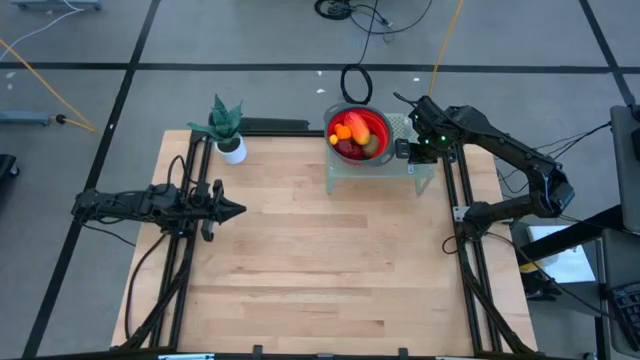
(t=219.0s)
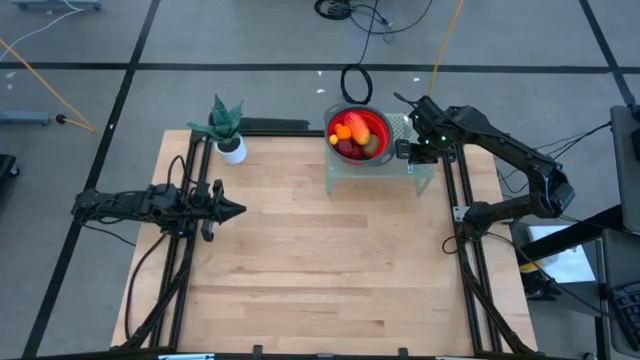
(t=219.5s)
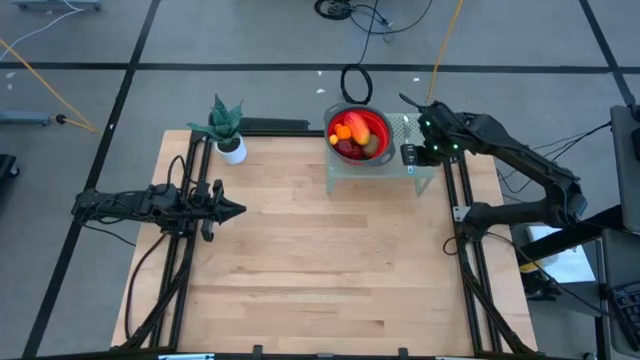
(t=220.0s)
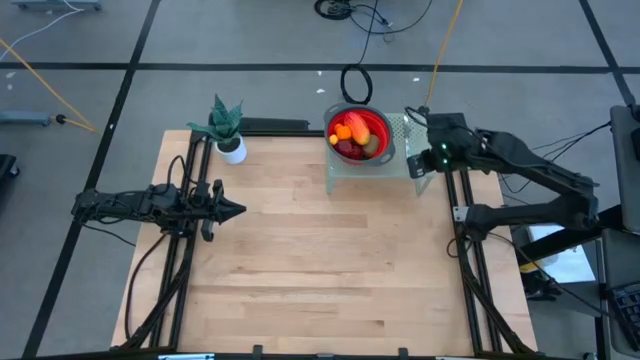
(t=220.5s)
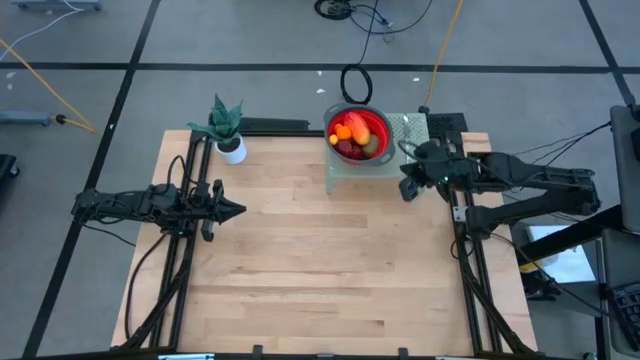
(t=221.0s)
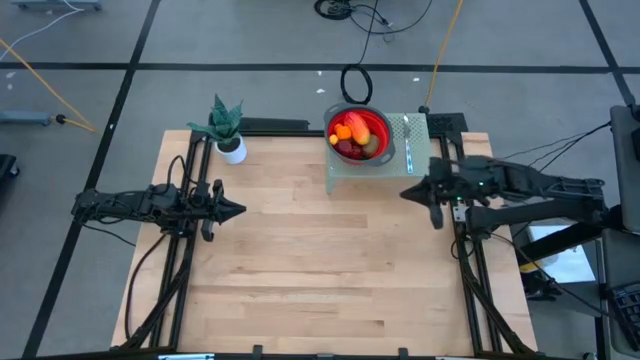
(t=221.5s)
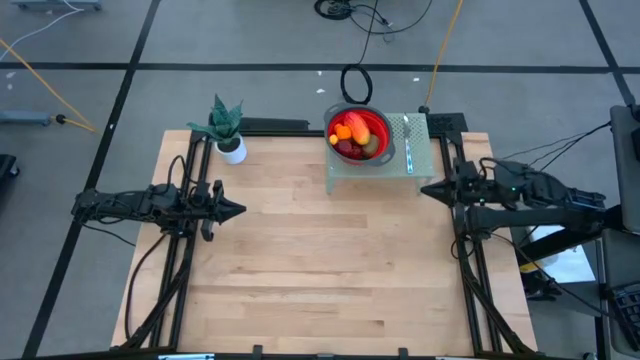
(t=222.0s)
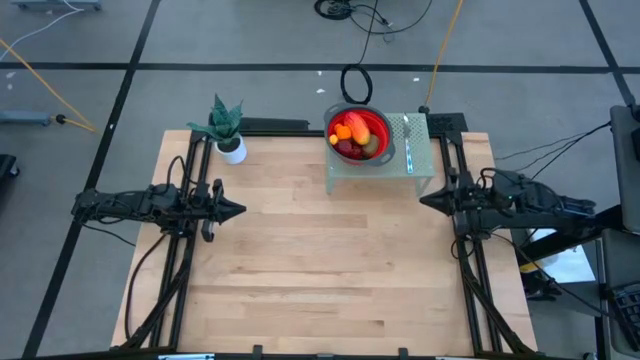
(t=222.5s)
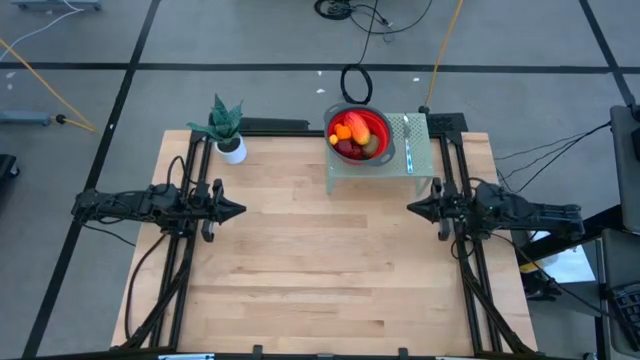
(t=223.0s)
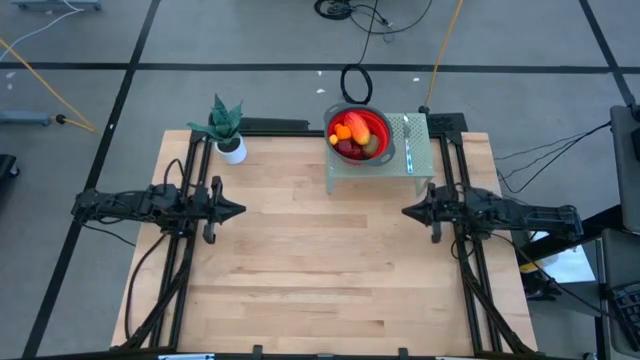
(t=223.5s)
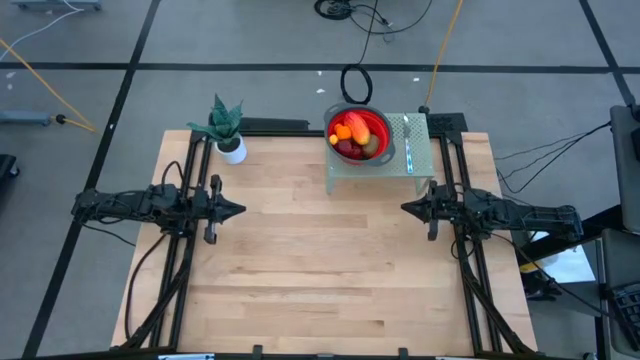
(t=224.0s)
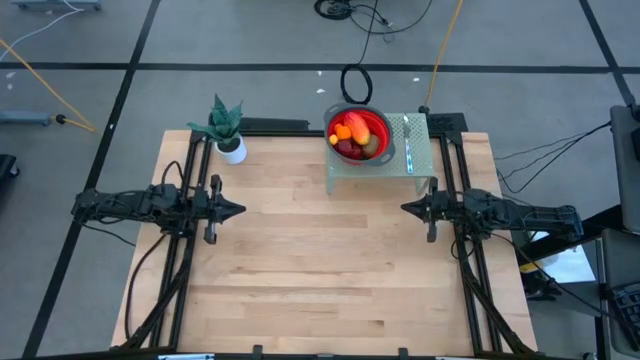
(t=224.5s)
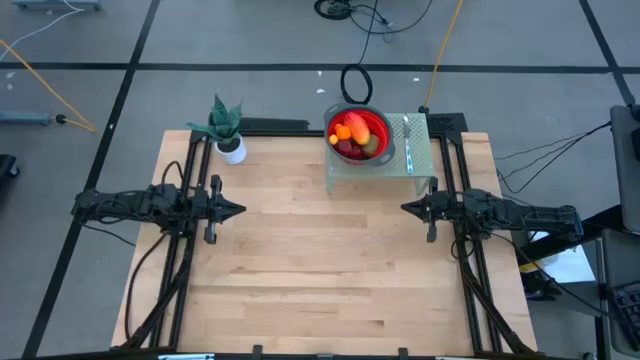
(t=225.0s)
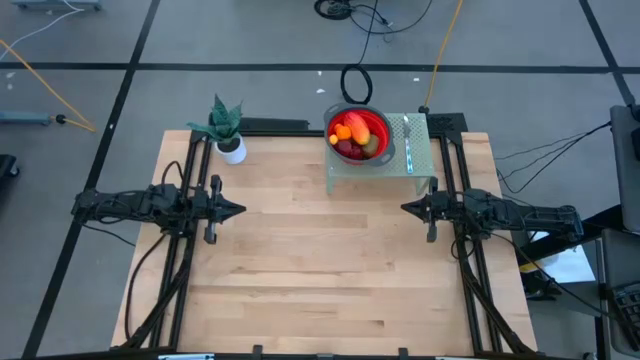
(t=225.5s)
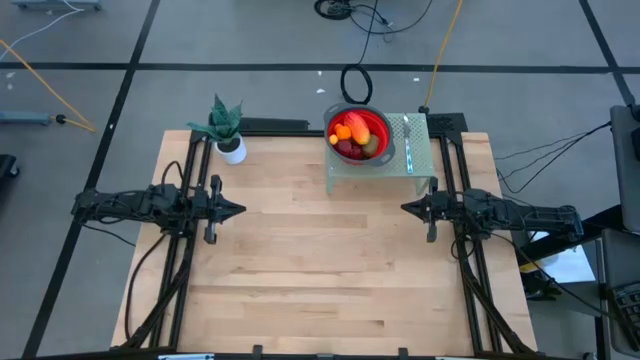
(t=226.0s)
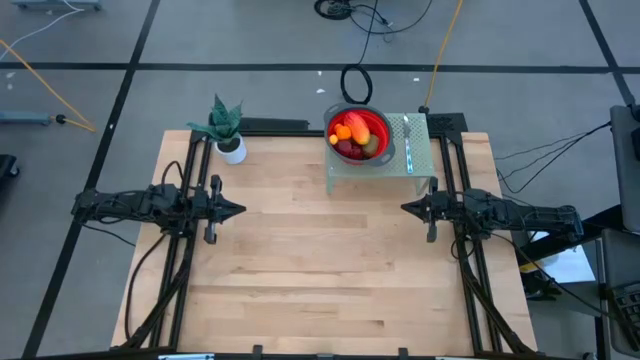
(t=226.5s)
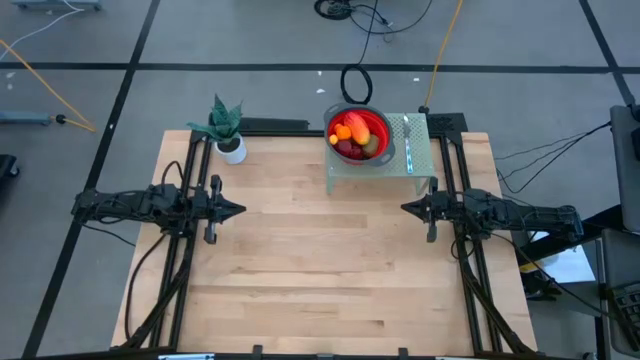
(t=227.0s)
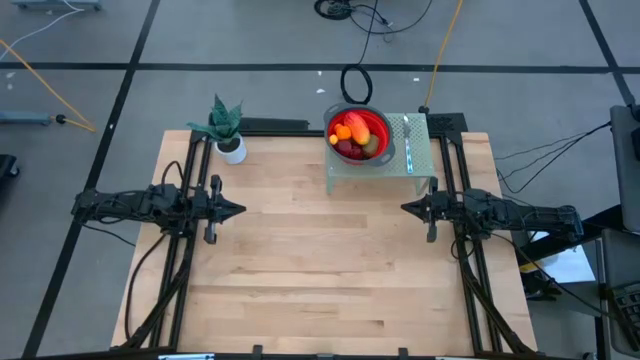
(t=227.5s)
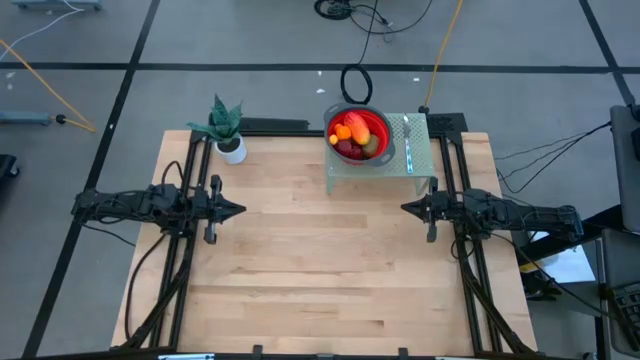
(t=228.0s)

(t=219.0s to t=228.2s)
Task: Pick & Place Fruit
Return To Home Position

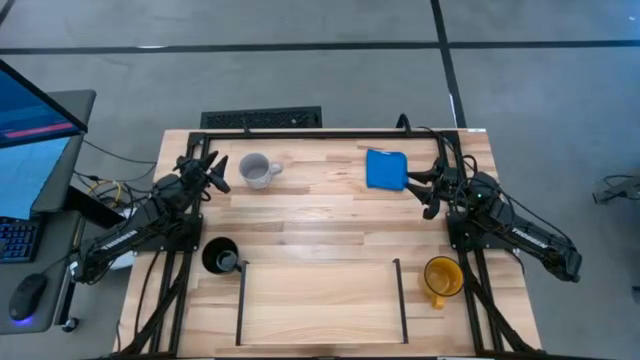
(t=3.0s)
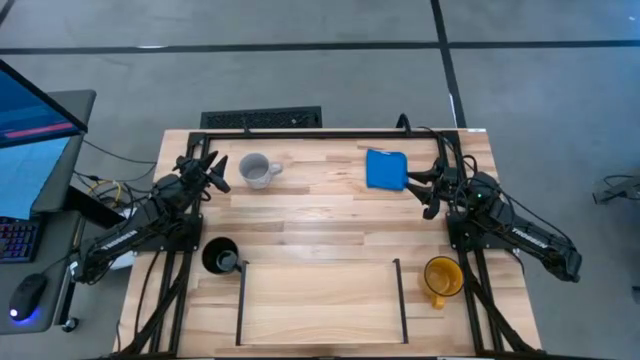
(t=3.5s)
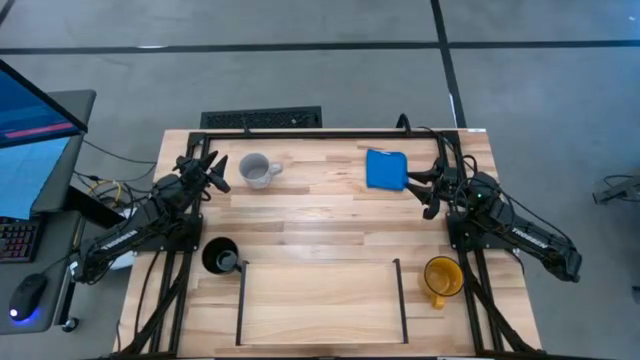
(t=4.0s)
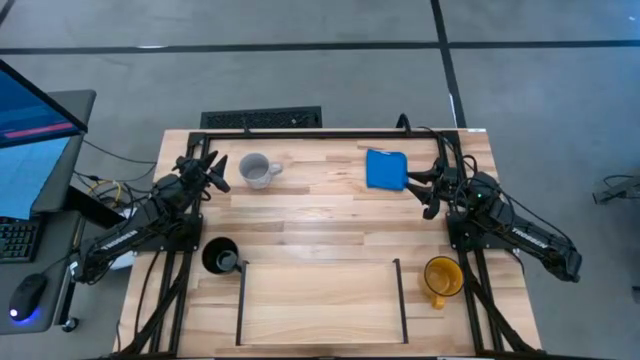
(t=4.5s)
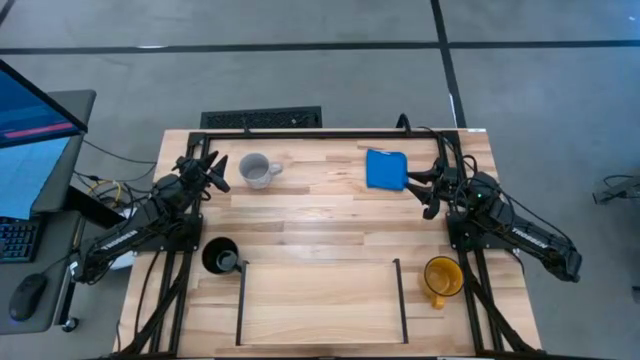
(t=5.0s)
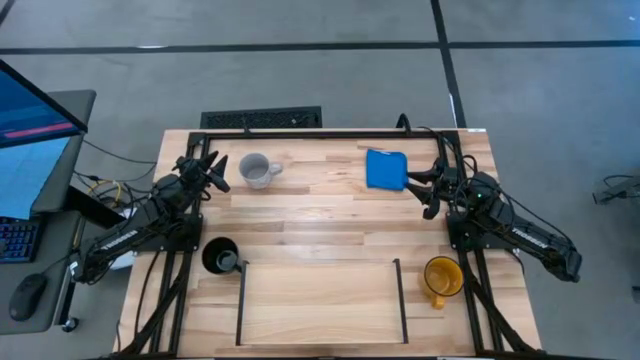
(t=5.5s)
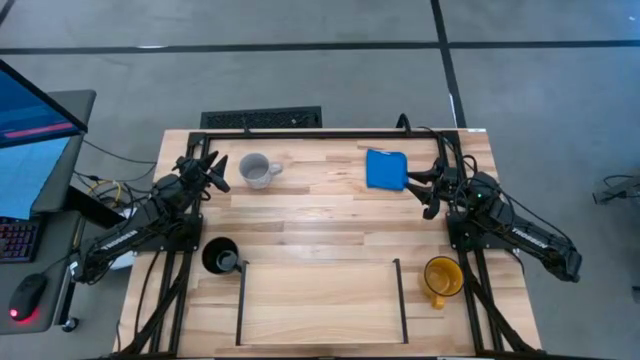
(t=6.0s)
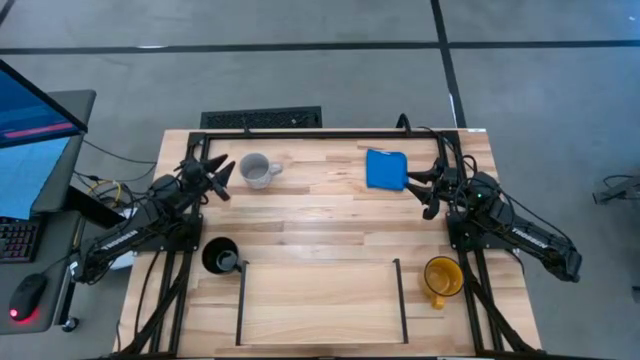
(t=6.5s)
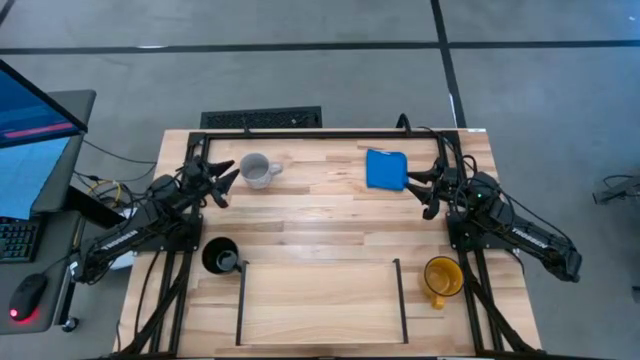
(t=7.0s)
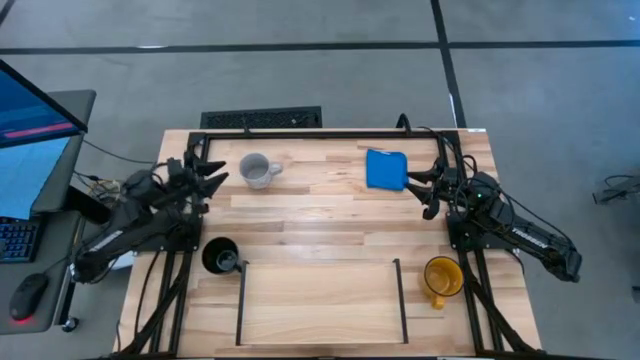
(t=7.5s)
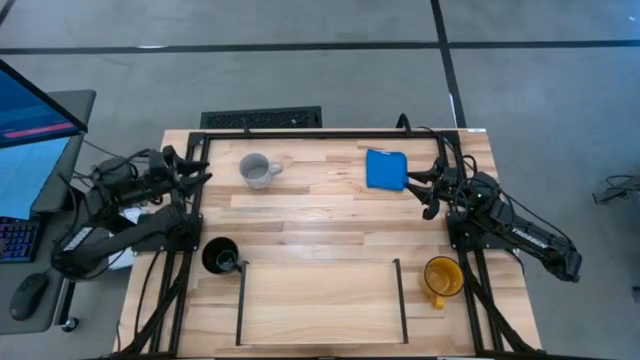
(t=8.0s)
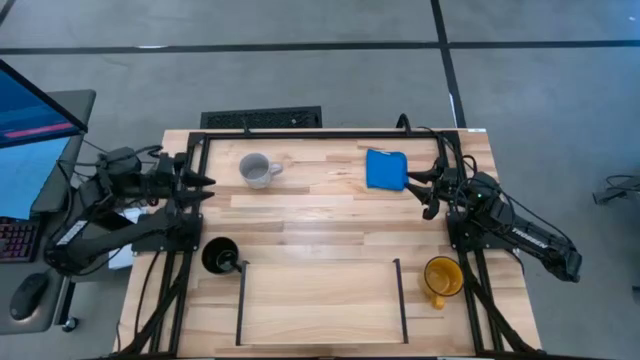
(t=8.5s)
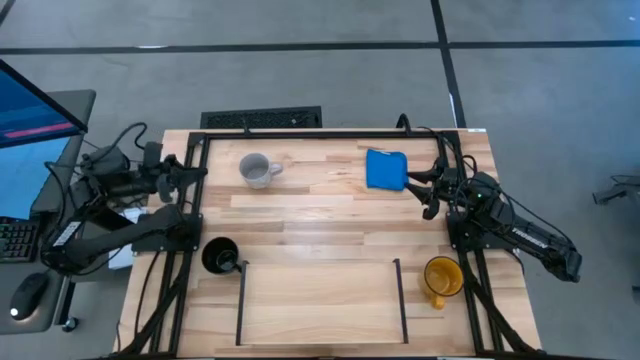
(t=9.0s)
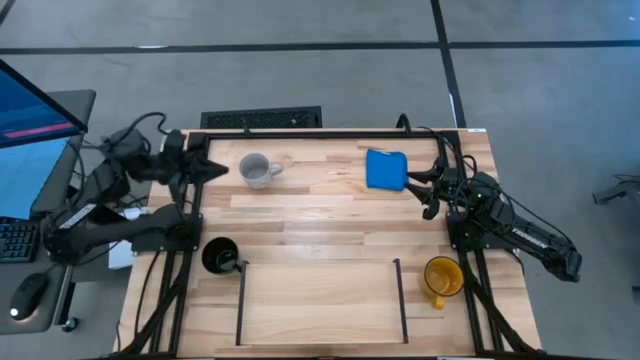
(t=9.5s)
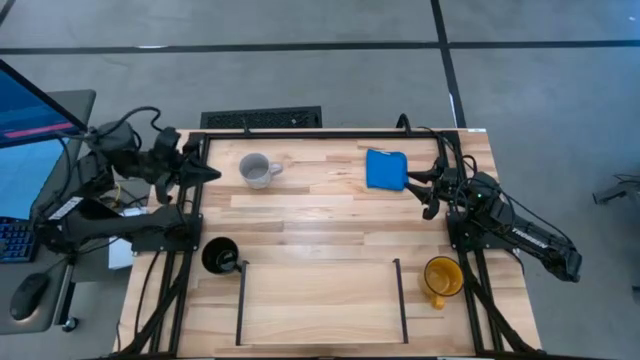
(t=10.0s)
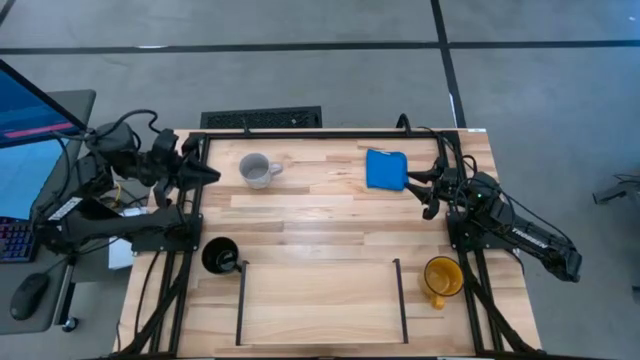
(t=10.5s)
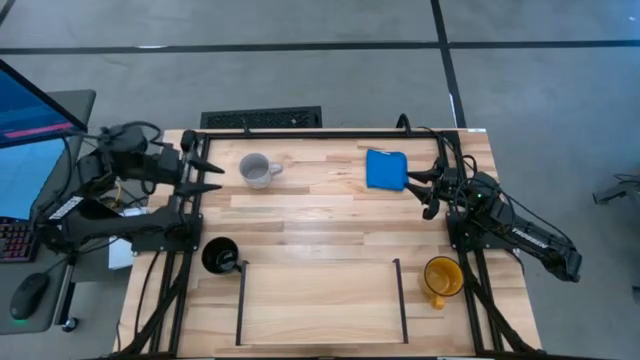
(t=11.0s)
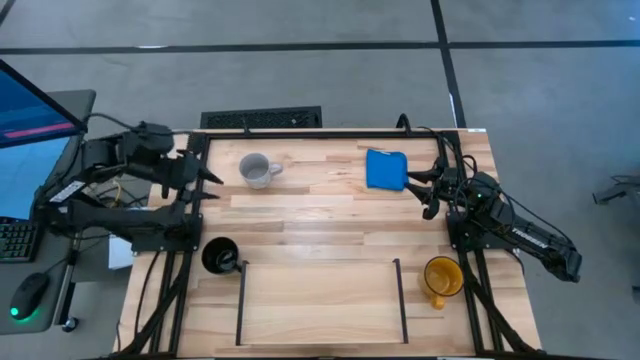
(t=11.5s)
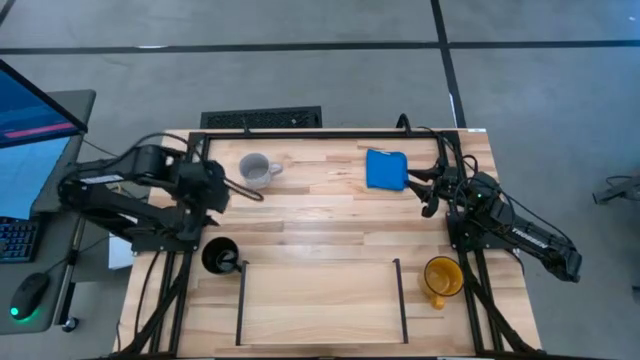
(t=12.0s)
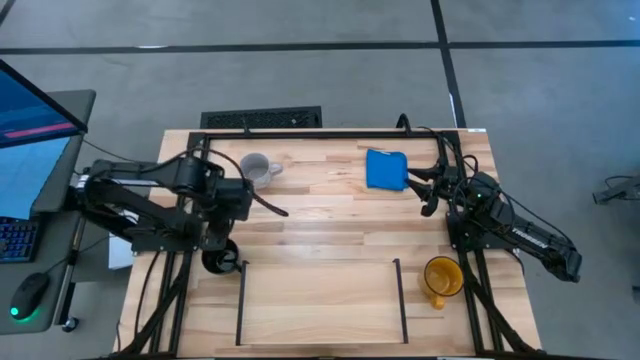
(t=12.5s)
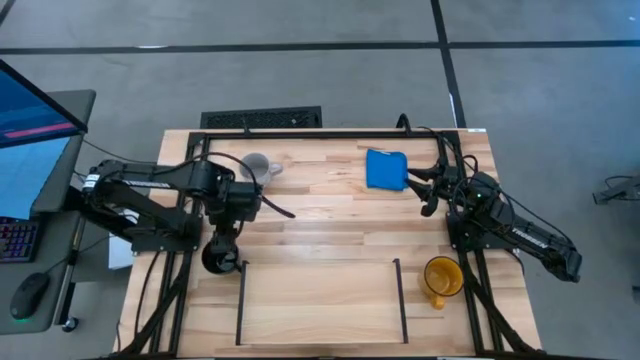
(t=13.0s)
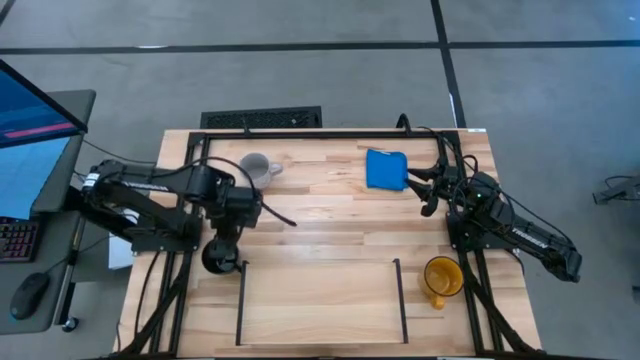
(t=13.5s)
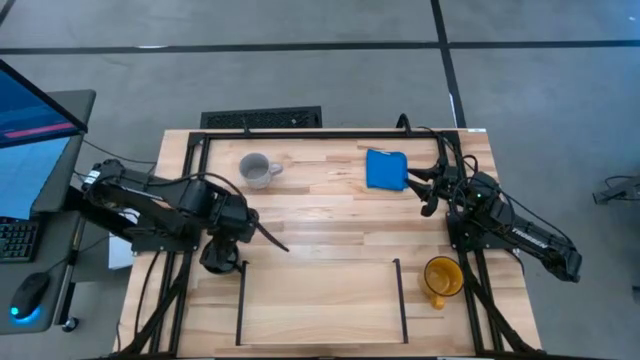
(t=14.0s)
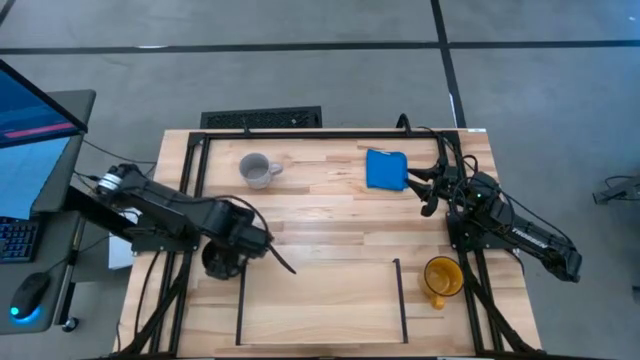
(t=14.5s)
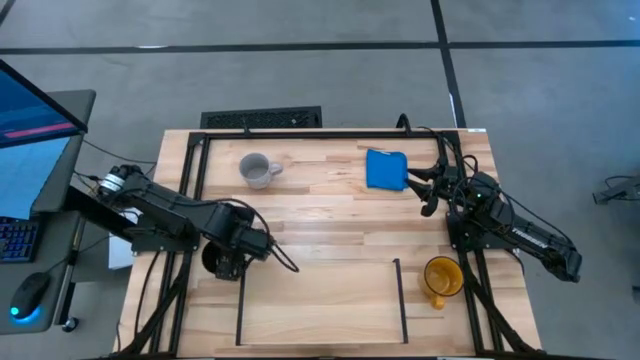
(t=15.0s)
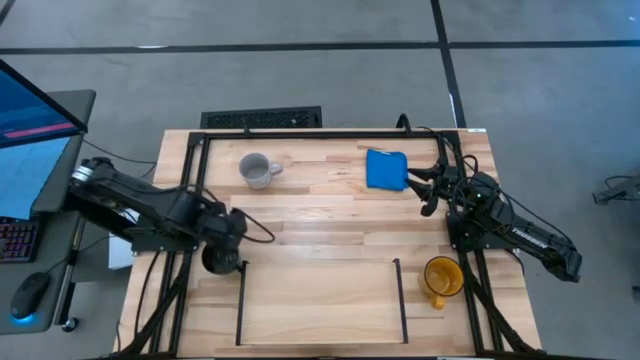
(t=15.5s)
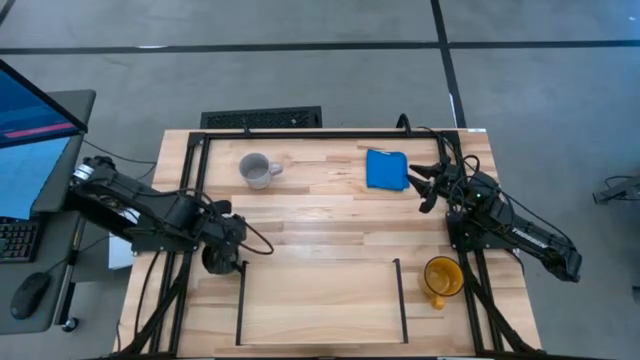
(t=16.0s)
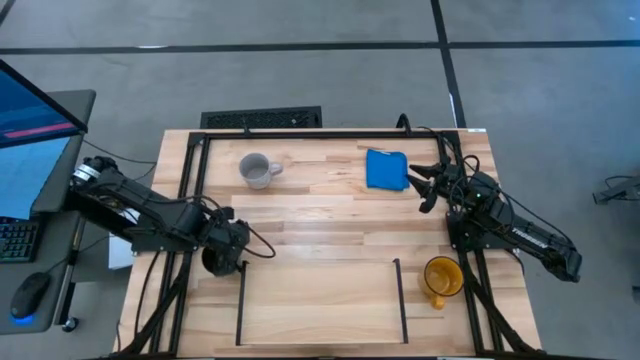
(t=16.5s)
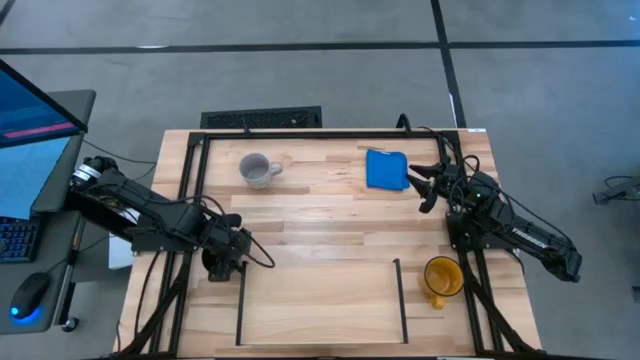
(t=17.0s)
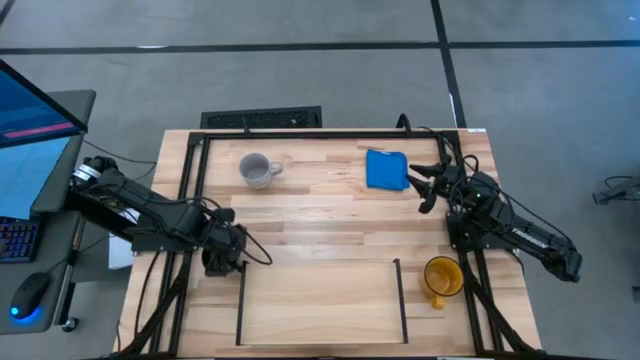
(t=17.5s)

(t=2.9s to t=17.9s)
Task: Stack small to large cups/mugs on shelf
Put the black mug on the shelf
